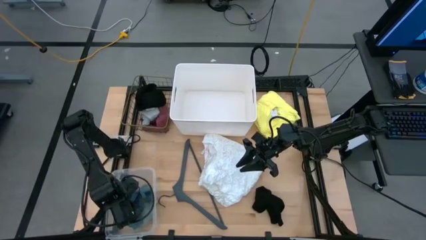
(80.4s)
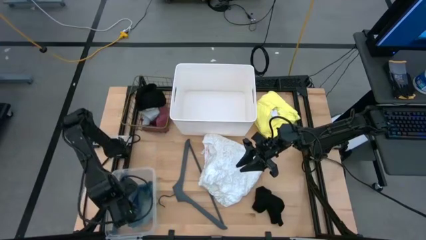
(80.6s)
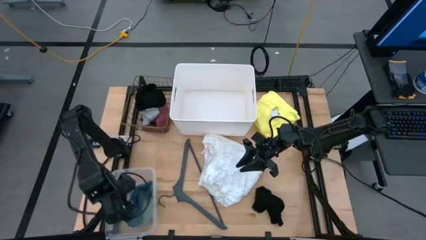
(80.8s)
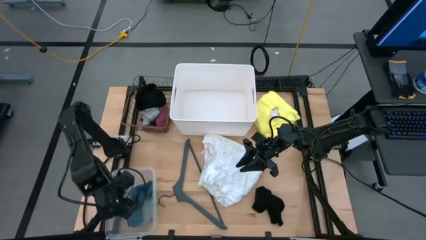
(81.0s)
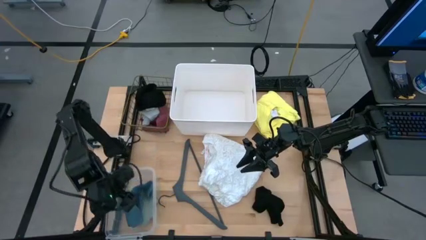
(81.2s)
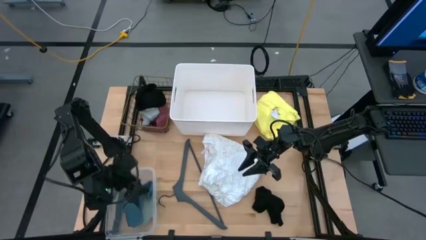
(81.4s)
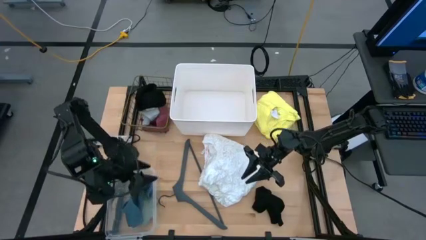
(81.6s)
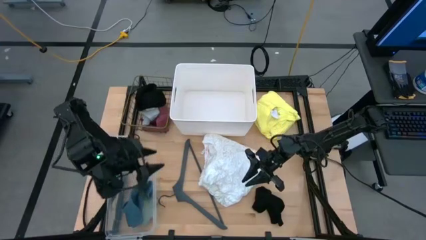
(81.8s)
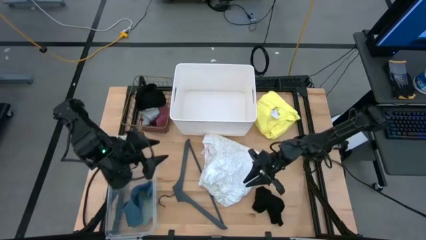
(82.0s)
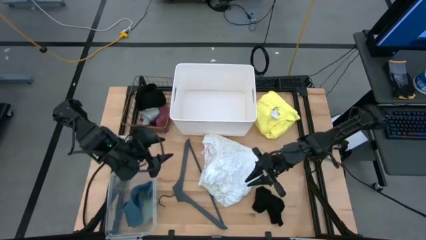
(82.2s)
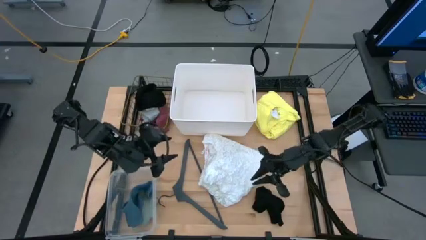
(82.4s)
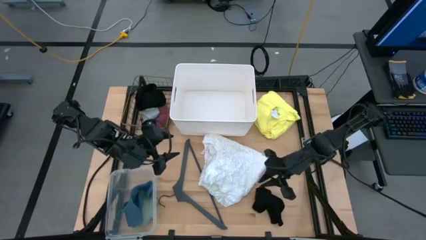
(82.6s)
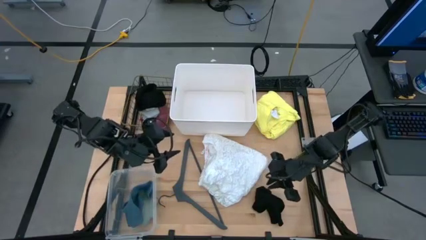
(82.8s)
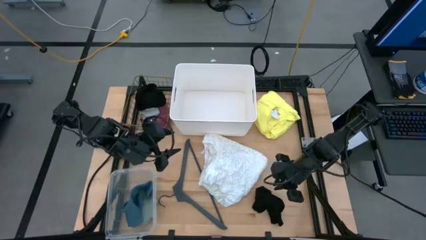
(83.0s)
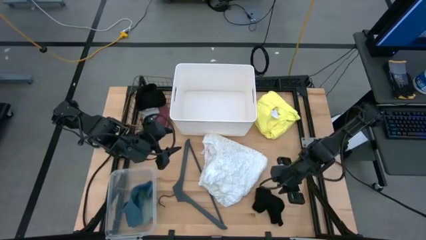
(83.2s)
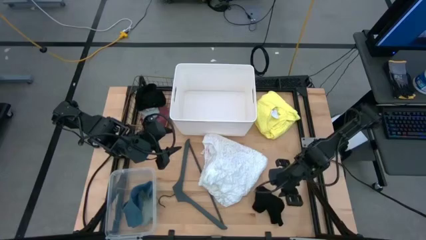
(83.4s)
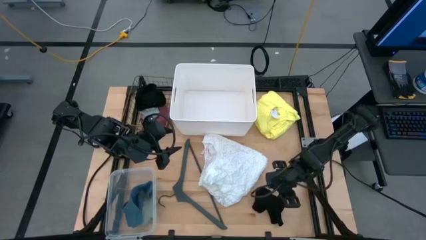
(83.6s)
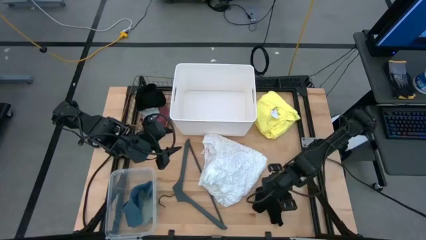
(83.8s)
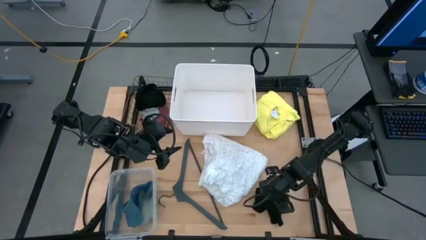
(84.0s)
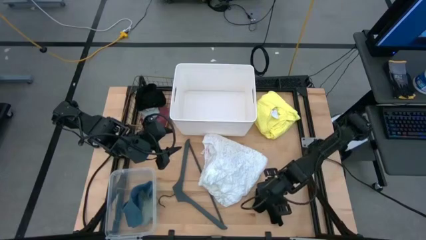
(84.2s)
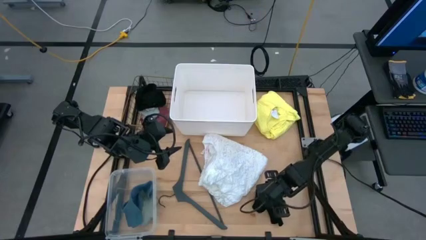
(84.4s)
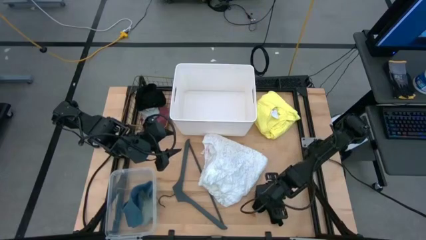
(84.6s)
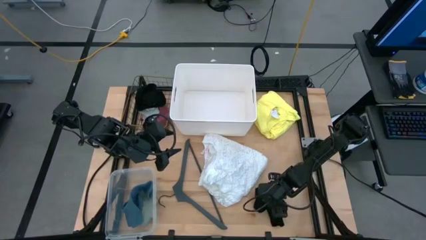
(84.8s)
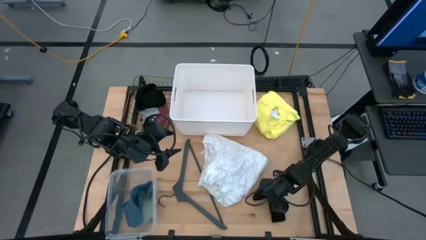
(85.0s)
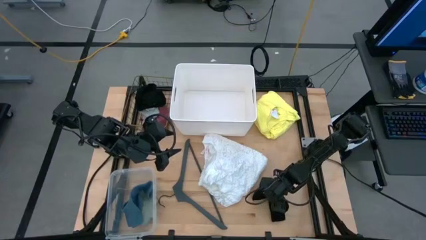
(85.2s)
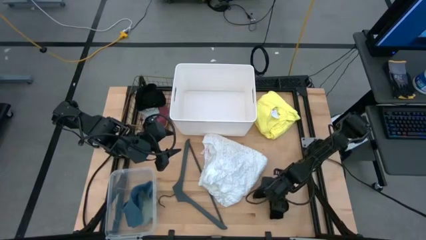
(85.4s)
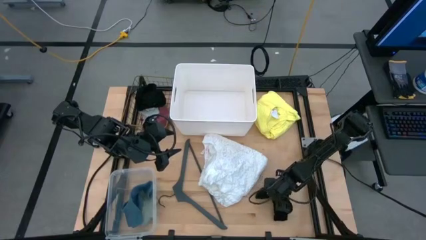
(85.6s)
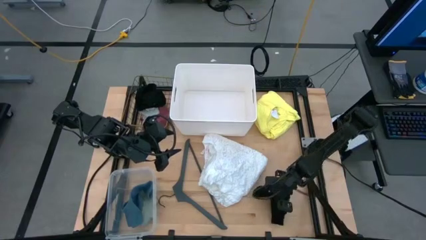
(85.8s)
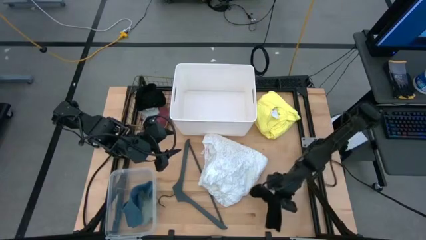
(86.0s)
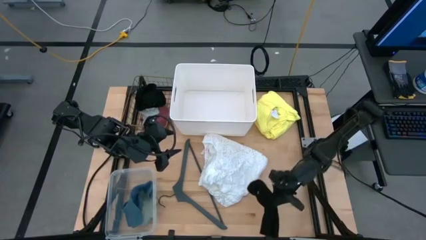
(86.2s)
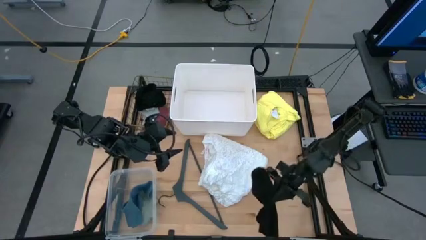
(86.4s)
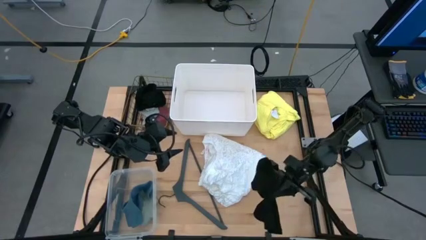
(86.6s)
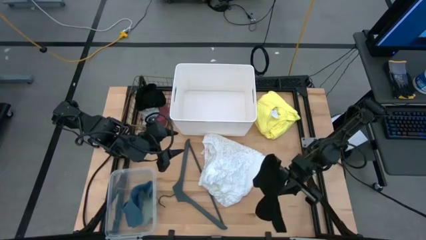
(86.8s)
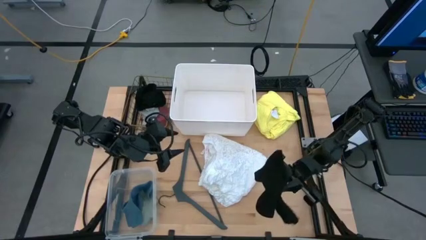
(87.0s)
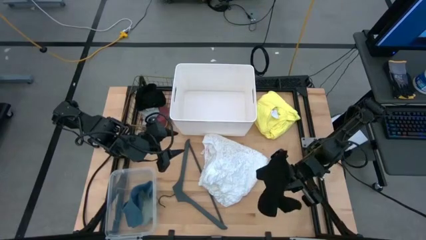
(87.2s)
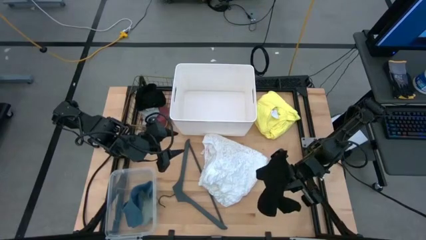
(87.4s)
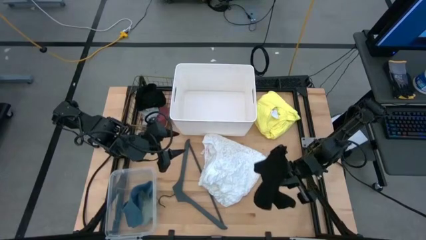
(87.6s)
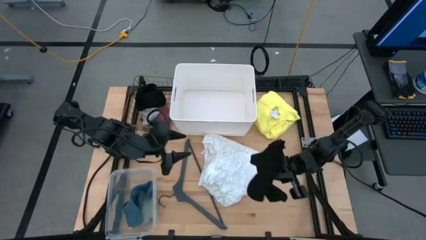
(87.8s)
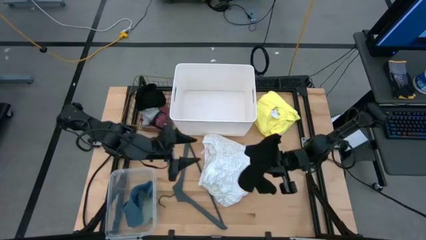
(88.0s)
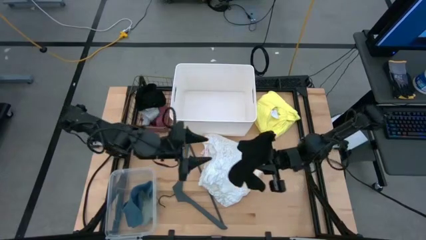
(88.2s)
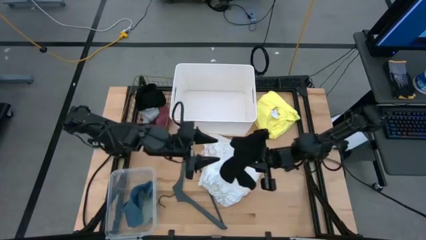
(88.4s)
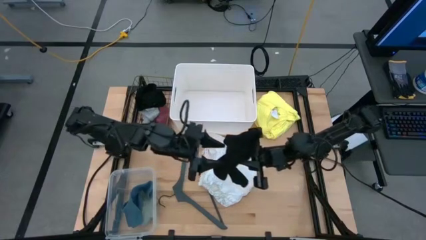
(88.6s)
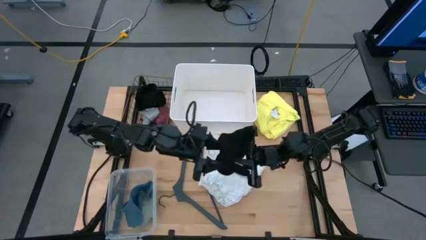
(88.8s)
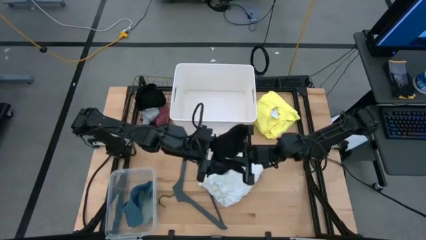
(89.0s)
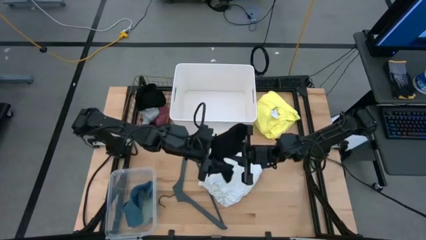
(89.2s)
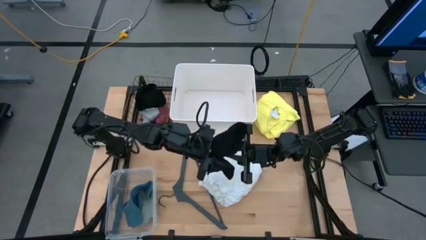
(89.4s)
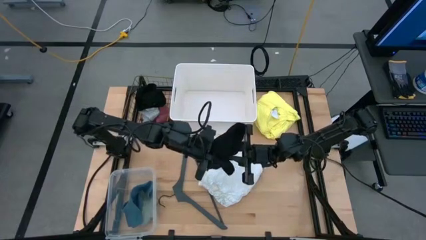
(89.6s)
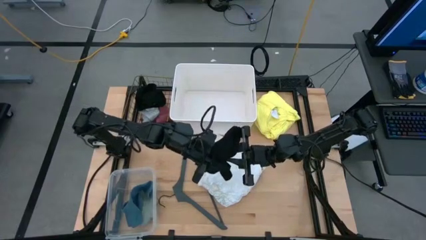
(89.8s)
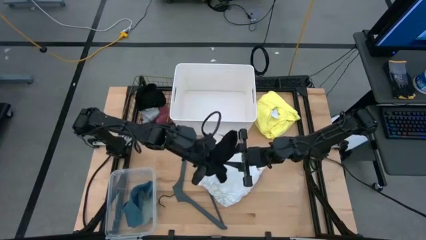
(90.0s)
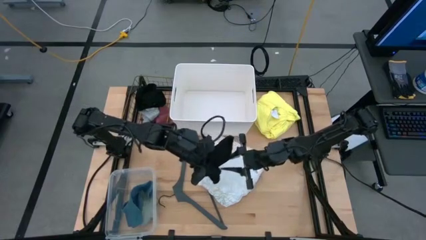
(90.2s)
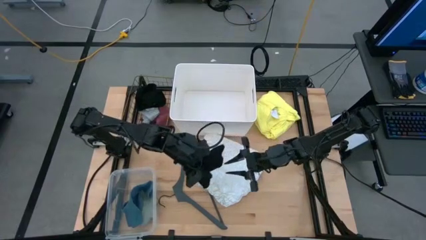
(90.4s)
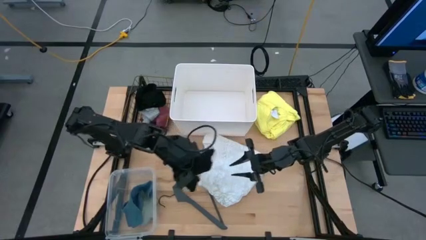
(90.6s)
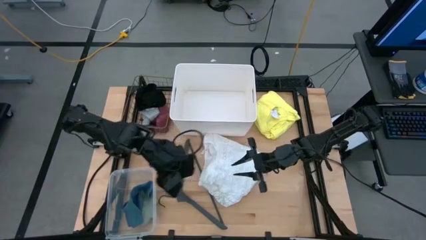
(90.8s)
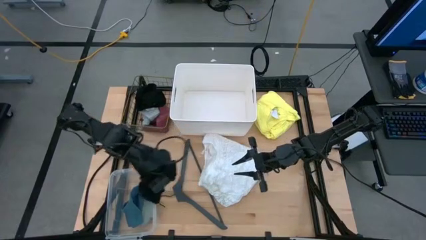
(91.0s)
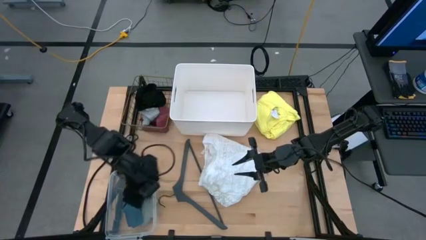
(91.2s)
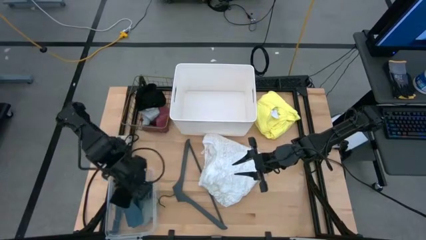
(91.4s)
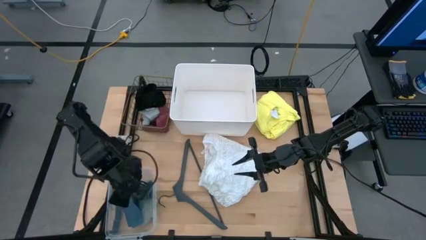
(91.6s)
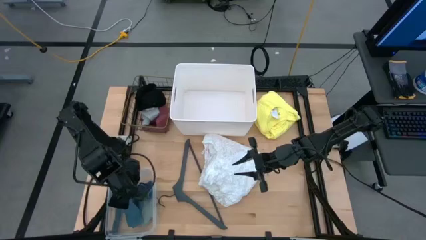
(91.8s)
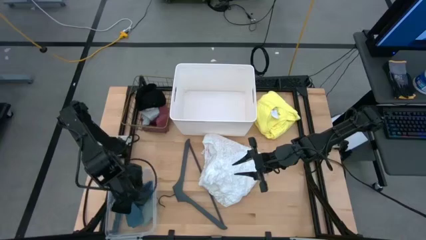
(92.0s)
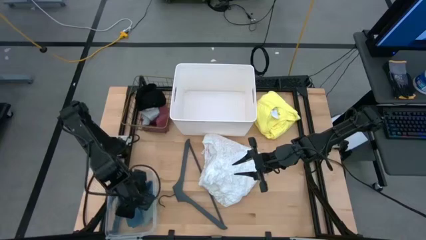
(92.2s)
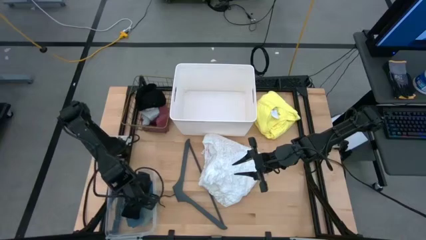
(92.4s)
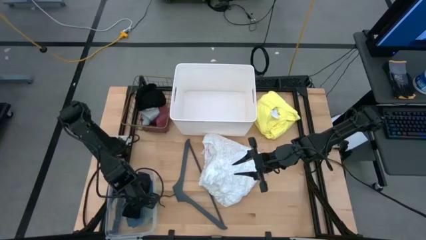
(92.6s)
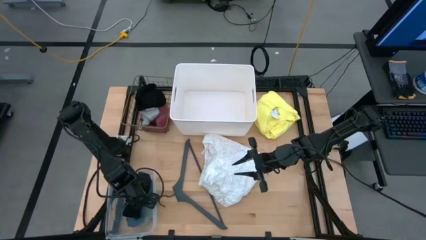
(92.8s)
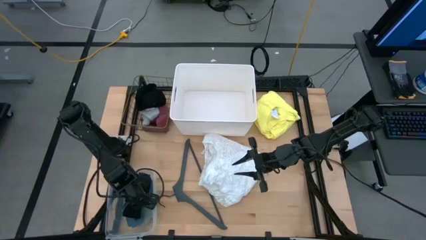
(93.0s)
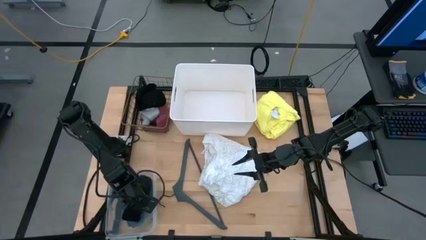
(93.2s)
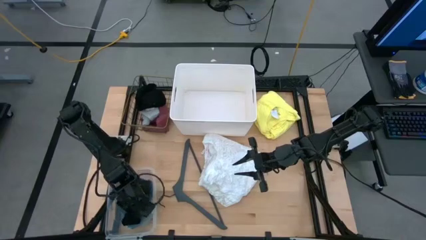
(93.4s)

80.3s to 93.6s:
Task: Pick & Place Cloths
Put the black sock into the transparent bin

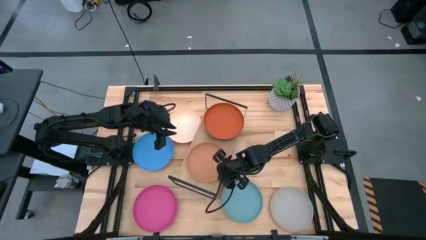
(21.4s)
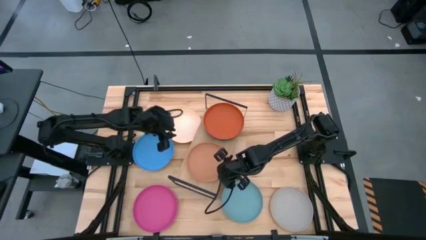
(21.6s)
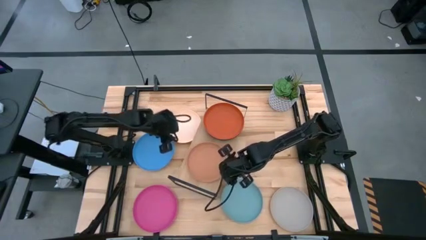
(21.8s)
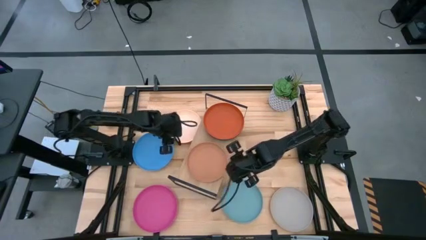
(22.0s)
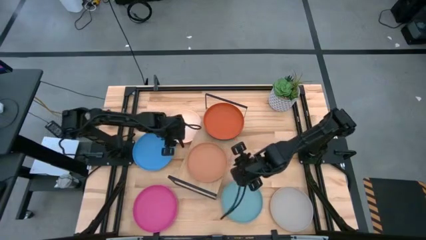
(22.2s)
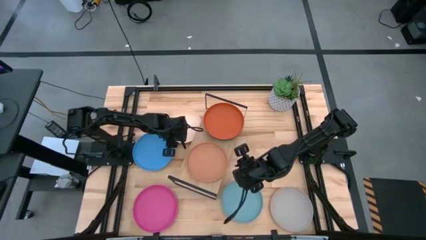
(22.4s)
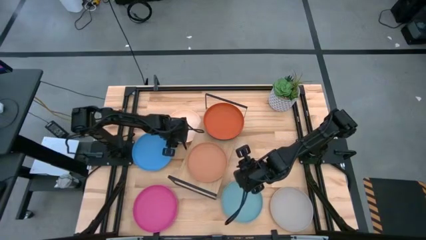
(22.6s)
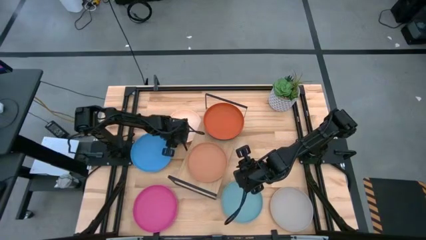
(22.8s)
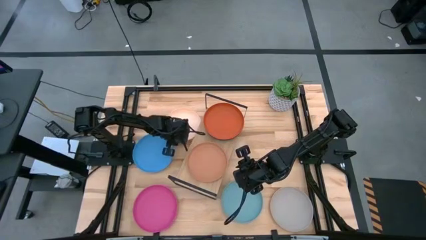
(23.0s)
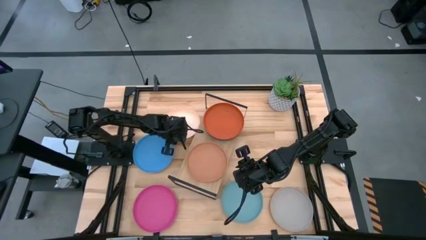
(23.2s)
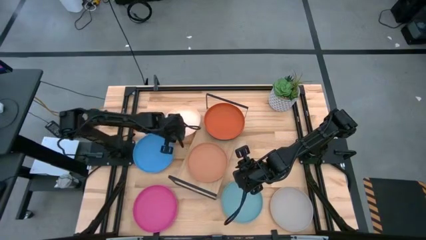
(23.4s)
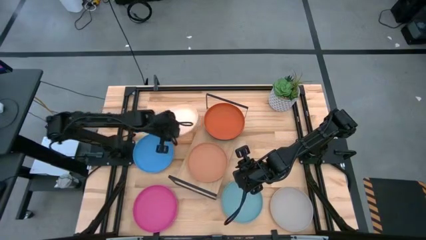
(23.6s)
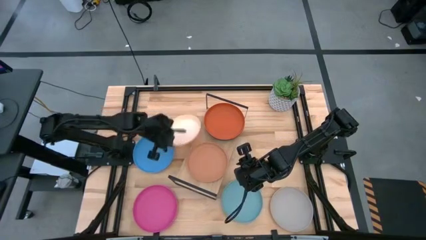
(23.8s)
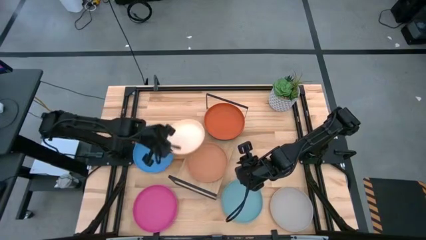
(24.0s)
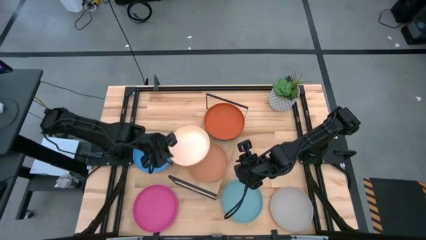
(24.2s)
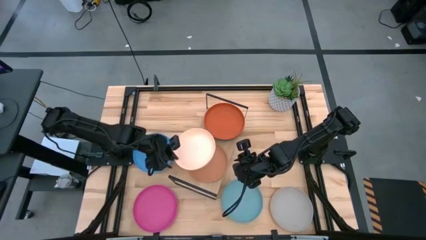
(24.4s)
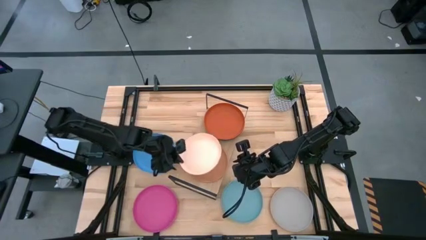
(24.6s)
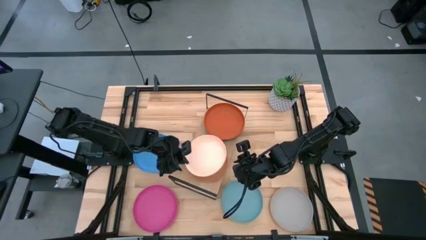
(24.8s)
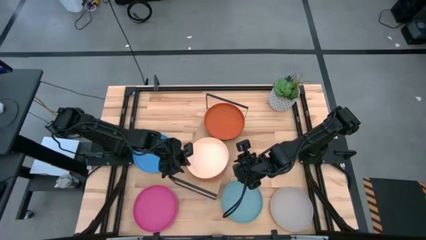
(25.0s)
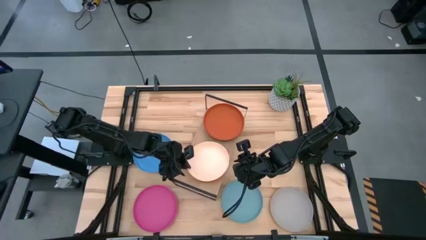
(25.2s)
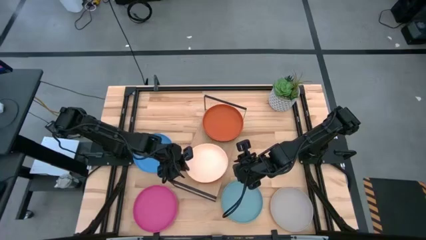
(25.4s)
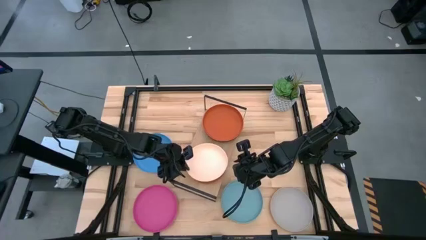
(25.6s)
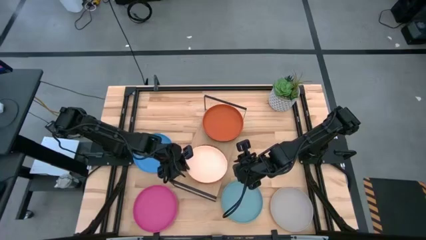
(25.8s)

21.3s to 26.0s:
Task: Place and stack plates onto a shelf
Stack the light orange plate on top of the light brown plate on the shelf
